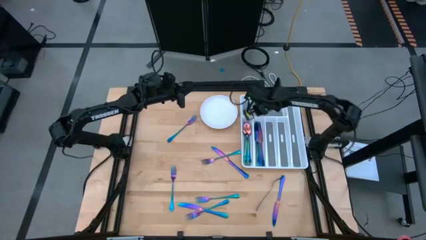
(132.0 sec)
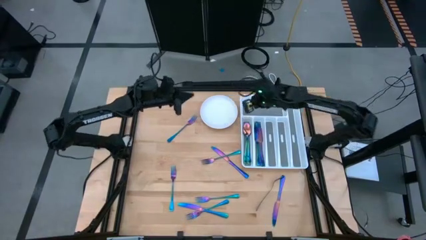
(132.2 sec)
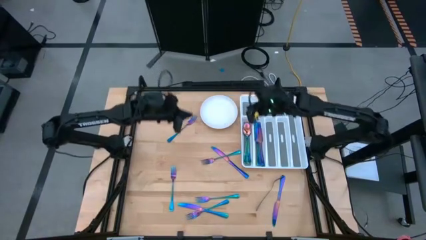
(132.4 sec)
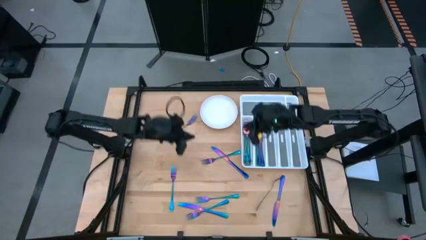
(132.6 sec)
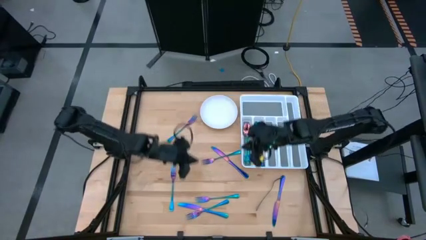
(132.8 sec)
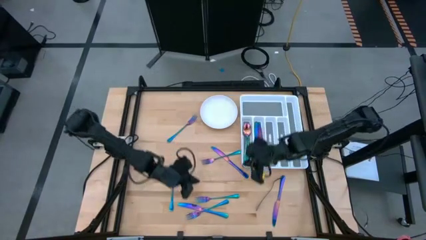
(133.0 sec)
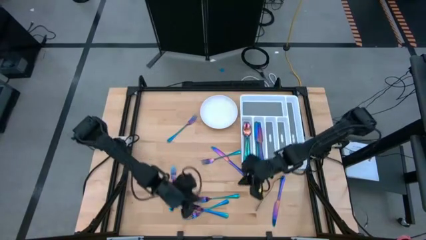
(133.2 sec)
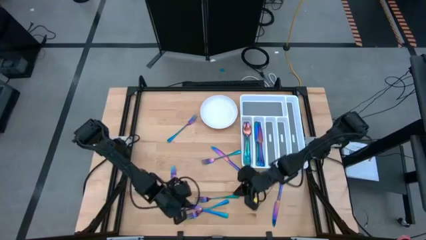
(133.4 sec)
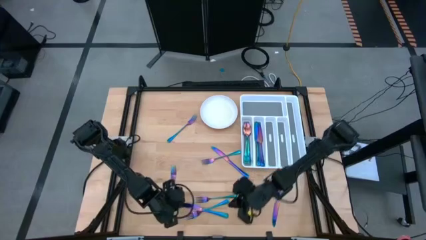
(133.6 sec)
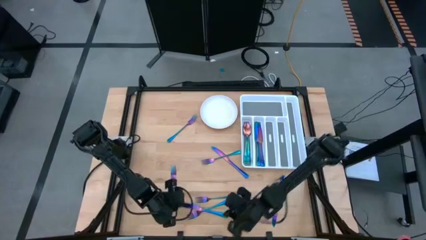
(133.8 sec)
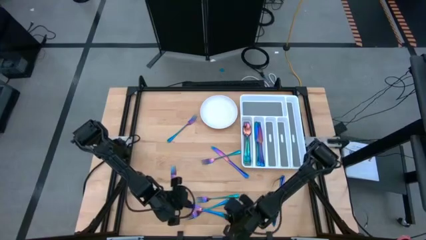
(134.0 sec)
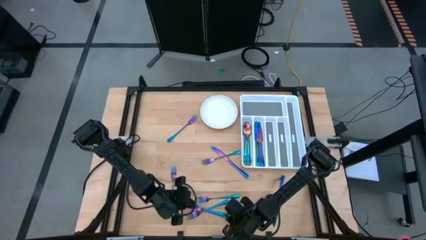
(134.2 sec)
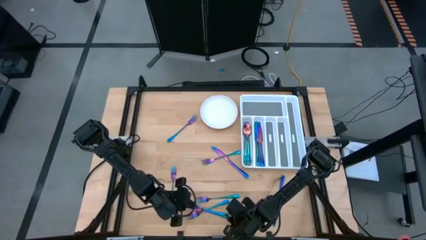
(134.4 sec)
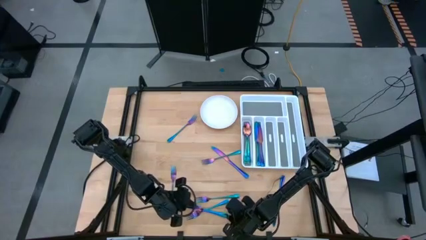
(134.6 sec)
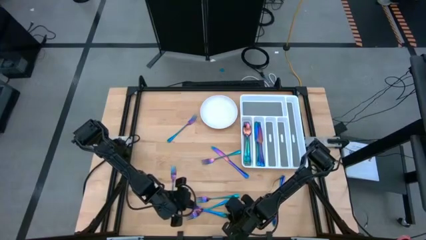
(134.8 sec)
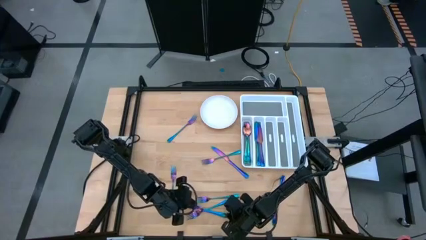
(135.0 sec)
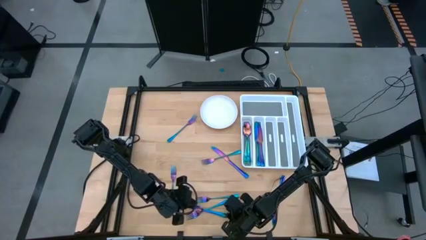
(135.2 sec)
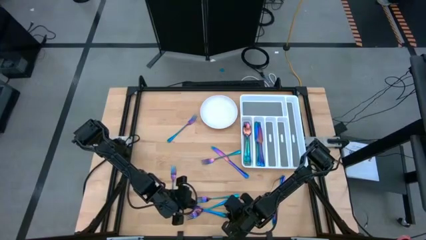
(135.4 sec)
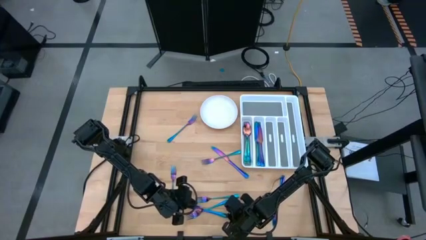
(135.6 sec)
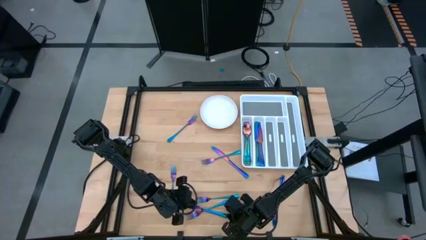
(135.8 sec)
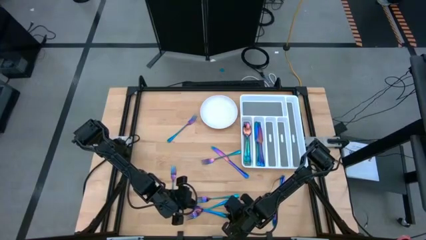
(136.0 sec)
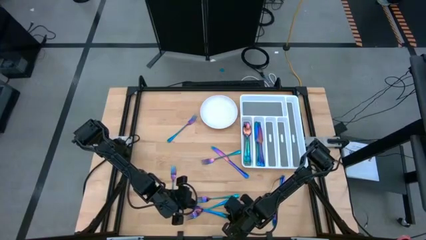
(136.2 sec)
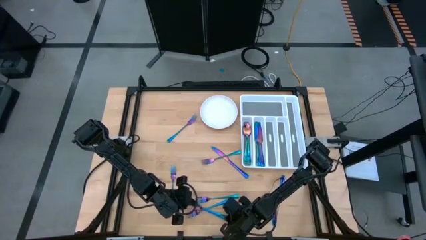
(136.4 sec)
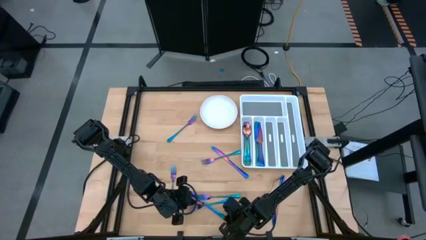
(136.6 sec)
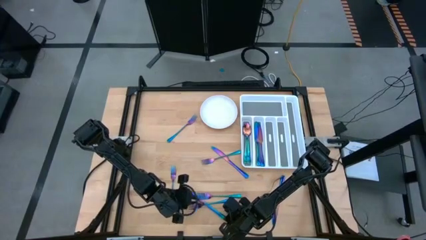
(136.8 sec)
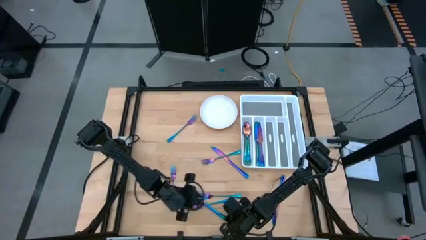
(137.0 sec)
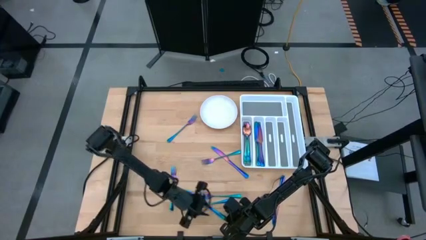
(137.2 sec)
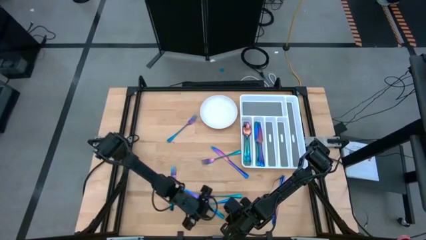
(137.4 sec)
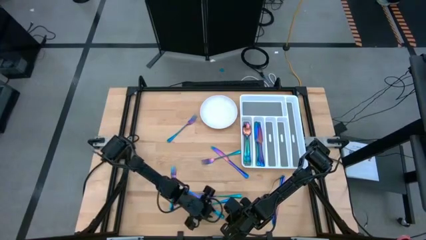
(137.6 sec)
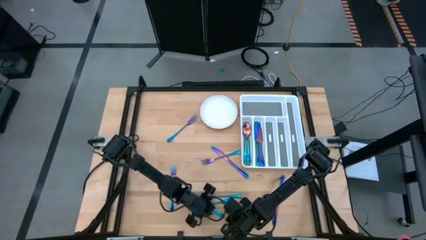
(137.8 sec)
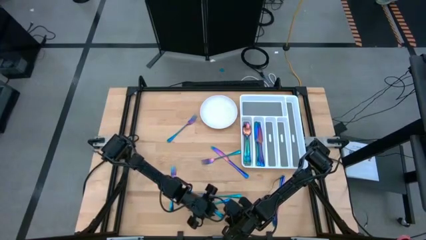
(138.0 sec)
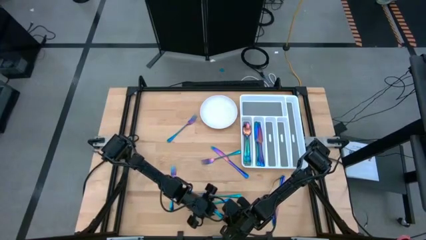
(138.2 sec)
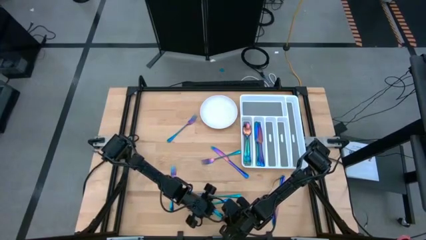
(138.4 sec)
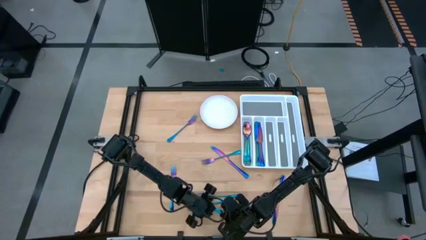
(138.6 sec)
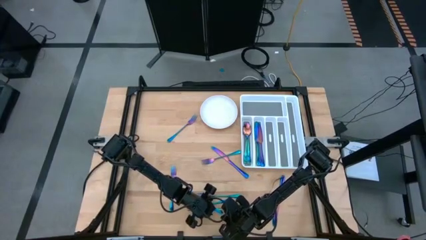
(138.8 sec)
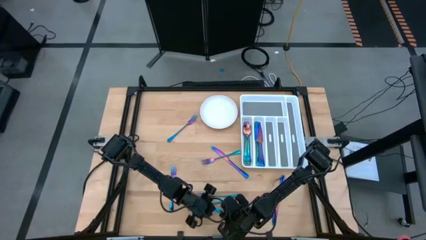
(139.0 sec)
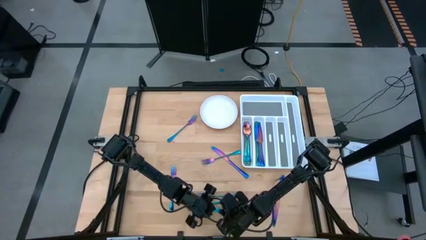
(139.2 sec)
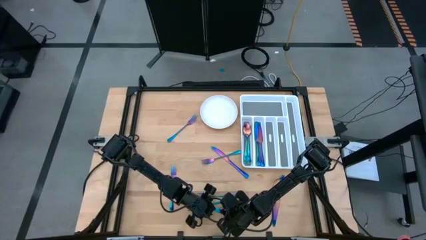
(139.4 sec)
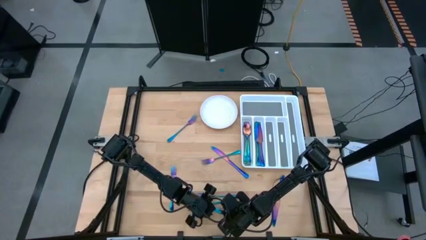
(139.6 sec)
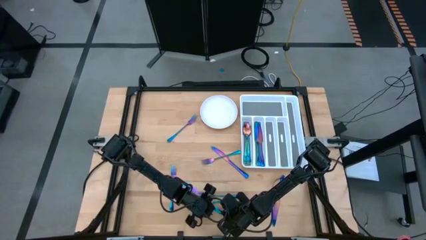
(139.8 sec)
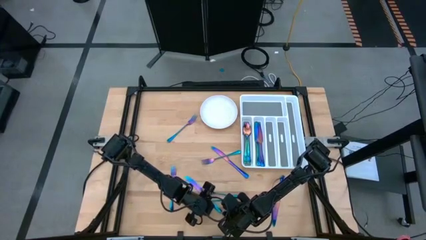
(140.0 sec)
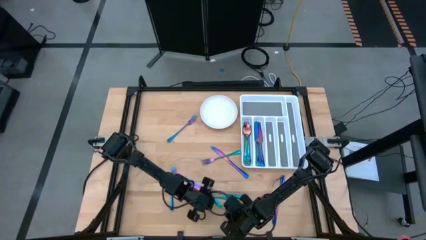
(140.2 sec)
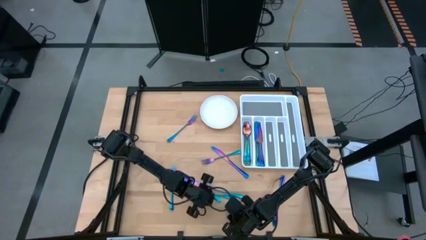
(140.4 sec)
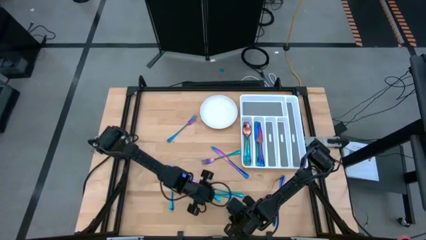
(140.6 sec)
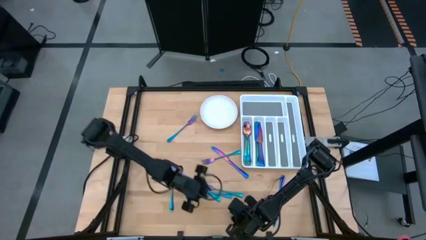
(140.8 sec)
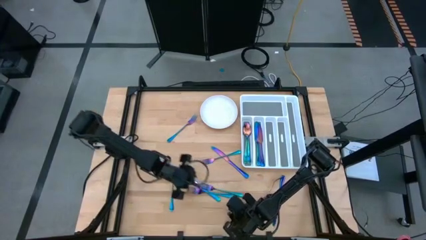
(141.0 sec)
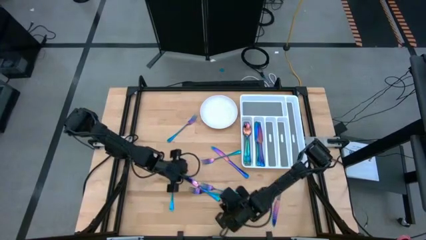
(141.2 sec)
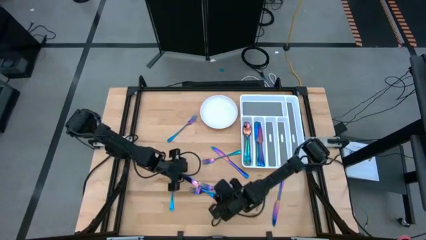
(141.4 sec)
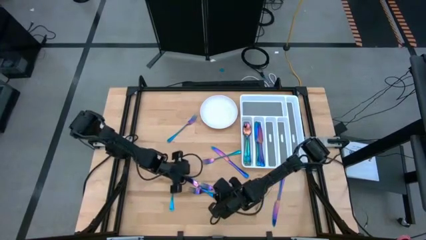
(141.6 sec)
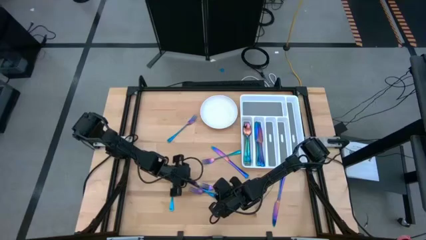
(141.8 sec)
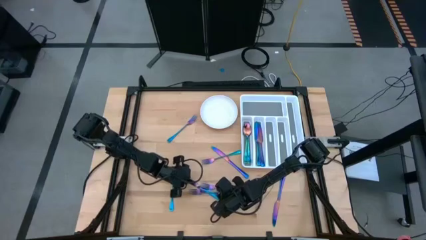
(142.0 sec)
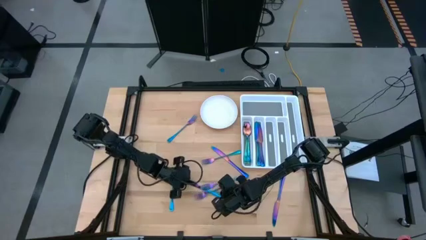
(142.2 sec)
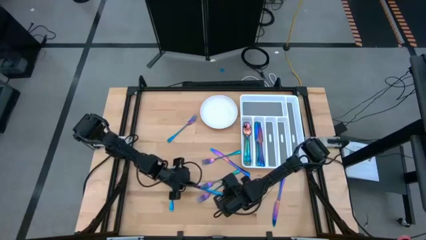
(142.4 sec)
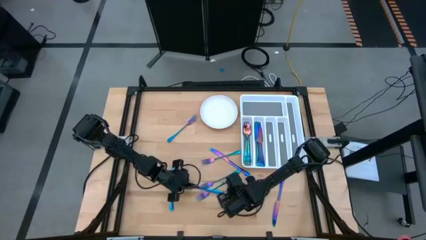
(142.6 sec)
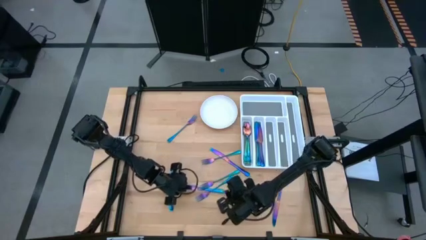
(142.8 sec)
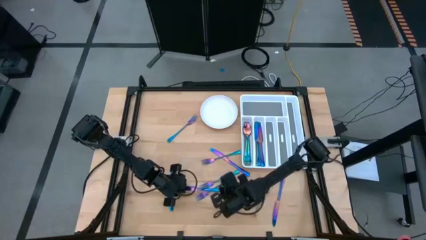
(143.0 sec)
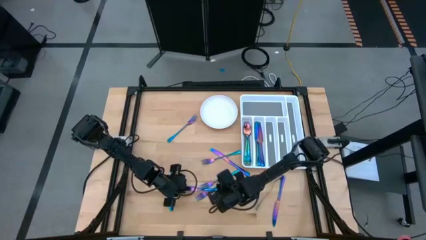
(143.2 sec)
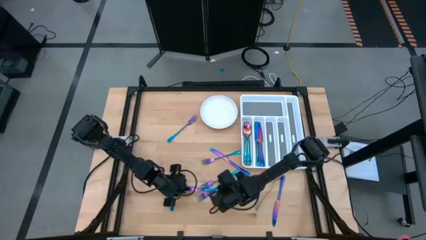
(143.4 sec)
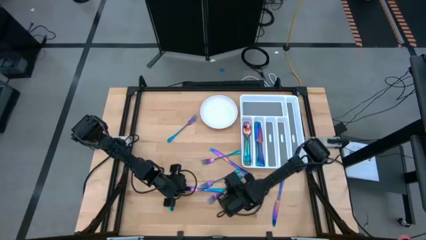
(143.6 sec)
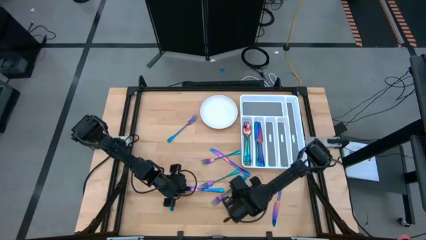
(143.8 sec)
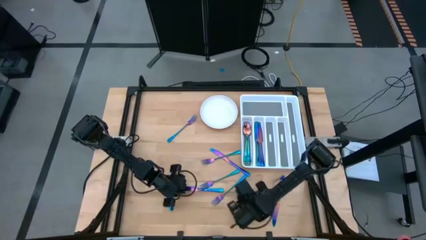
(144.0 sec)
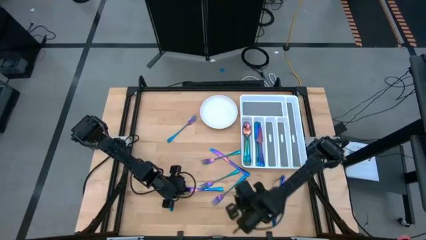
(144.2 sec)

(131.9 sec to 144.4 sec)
Task: Sort silverware
Put the purple table knife into the white silverware tray

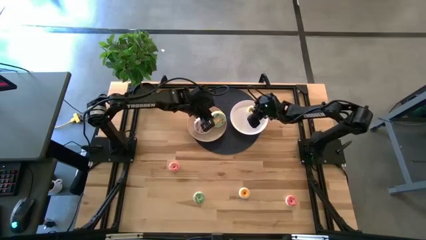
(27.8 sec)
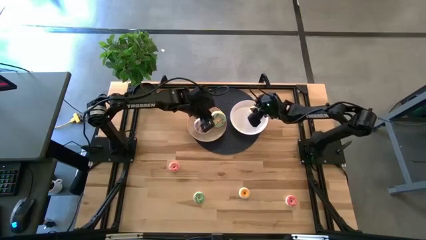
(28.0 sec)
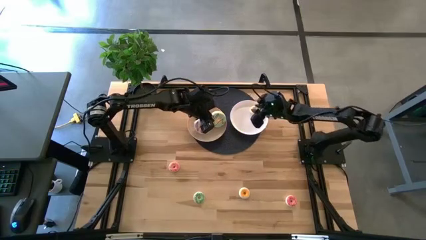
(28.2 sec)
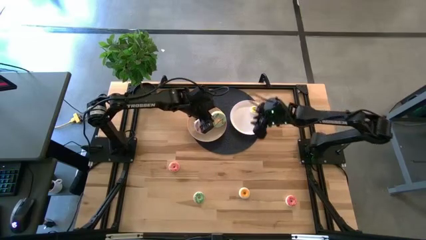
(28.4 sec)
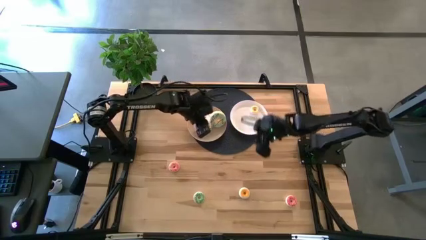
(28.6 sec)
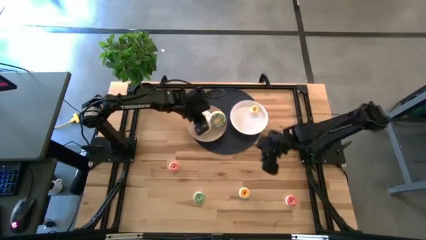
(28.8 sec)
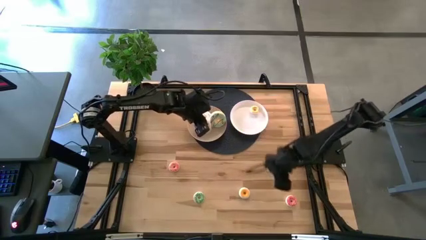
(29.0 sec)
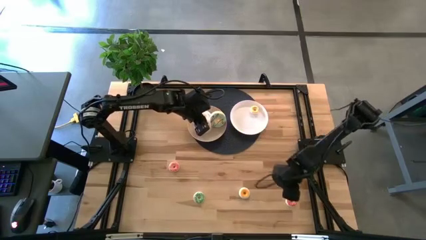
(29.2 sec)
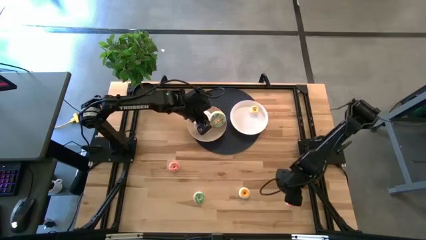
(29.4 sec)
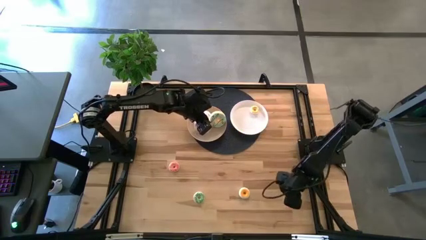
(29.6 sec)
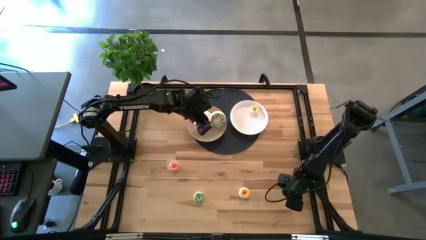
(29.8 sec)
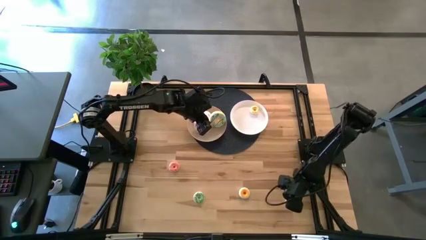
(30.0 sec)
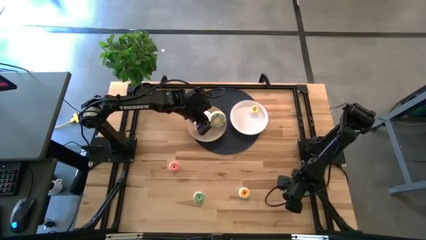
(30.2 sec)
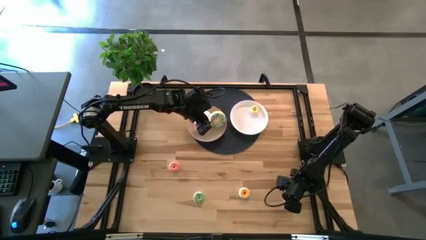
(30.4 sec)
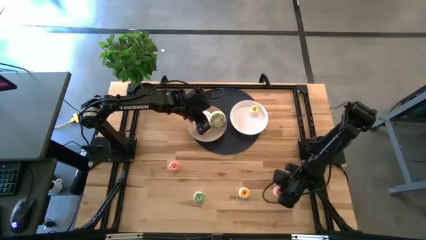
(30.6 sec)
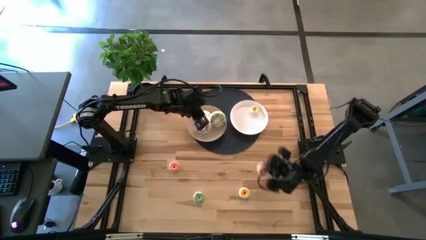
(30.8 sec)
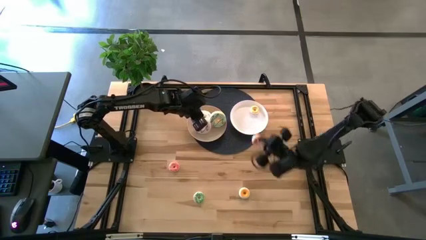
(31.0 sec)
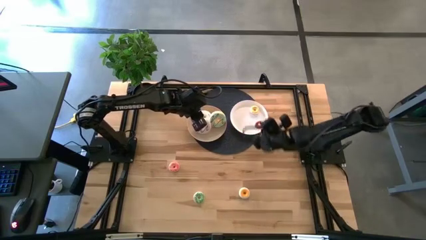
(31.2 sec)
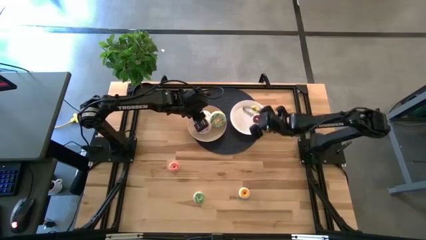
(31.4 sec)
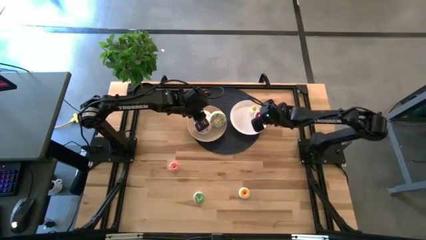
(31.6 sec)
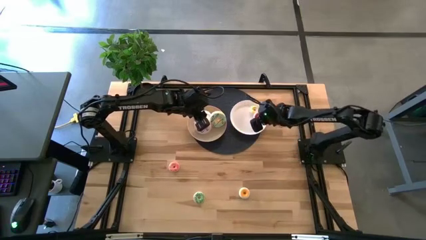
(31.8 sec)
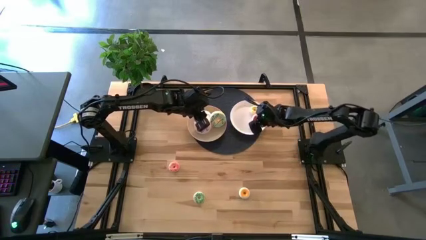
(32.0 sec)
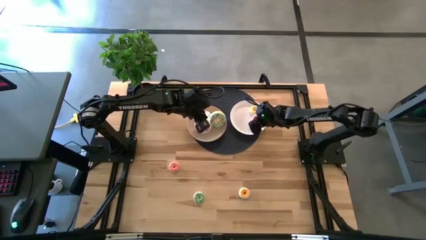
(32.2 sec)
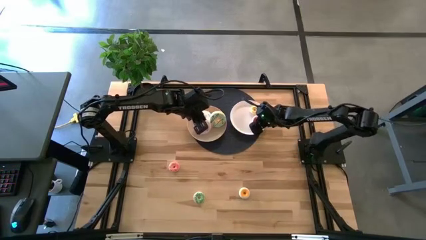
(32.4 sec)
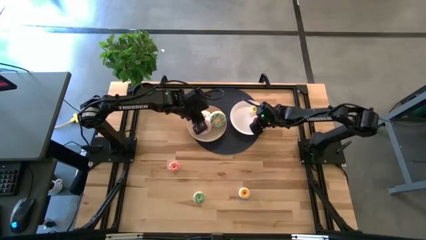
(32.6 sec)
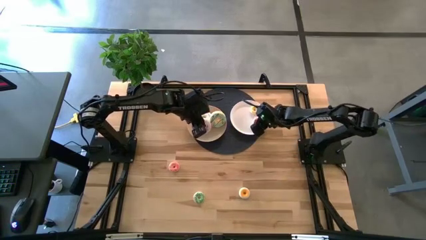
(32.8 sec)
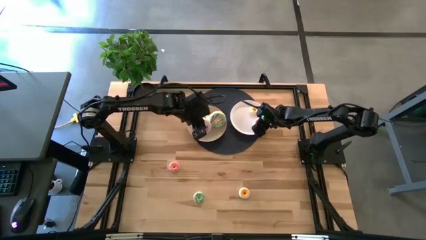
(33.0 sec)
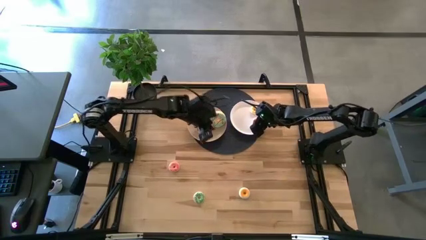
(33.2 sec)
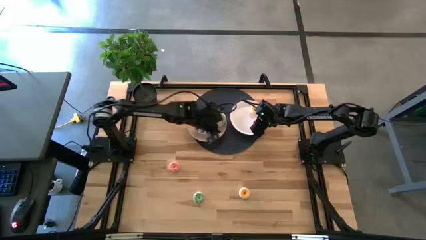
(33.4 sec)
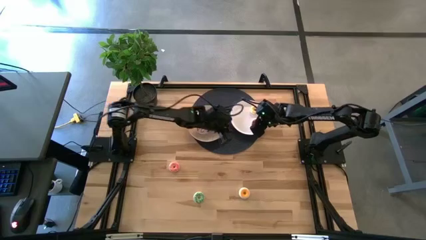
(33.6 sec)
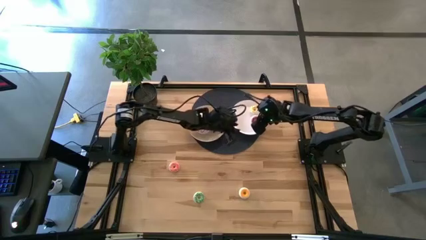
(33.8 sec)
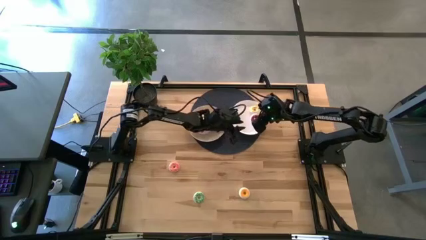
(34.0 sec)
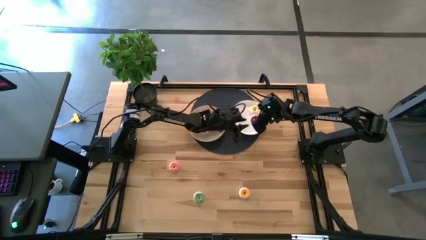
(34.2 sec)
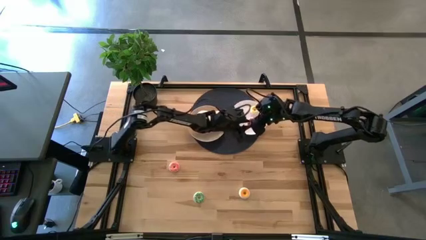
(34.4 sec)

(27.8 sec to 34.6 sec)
Task: Pick & Place donuts
Put the bottom small pink donut on the right white plate
